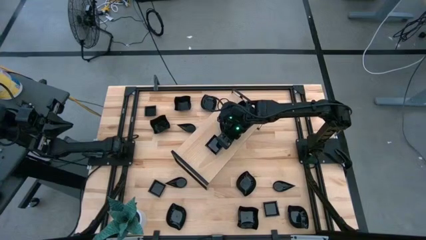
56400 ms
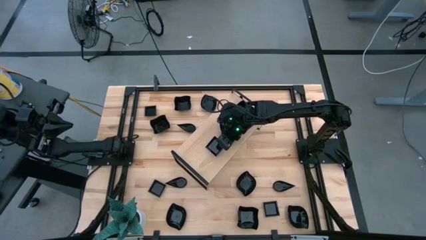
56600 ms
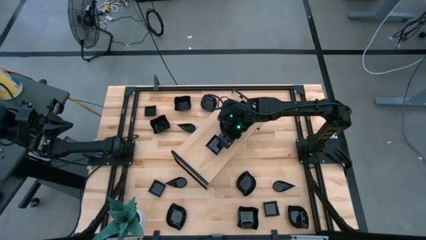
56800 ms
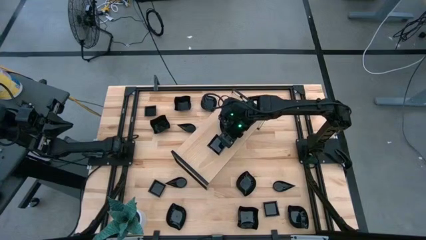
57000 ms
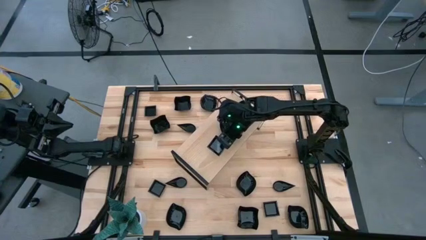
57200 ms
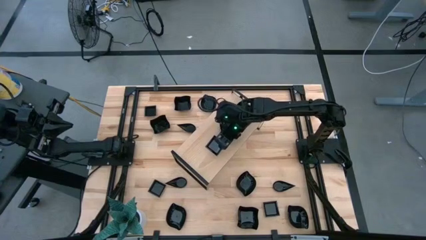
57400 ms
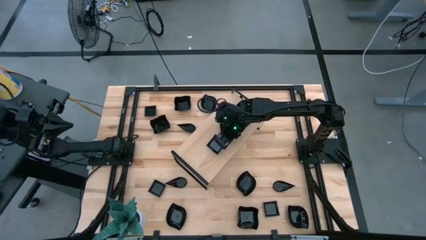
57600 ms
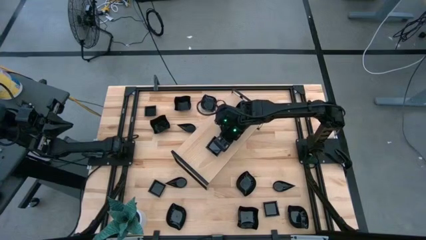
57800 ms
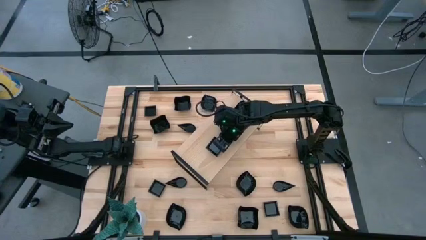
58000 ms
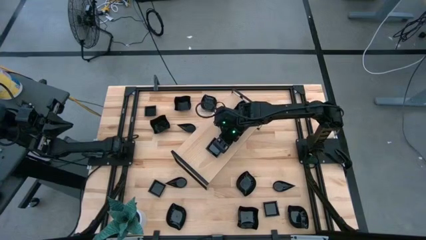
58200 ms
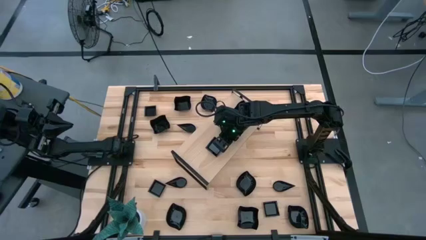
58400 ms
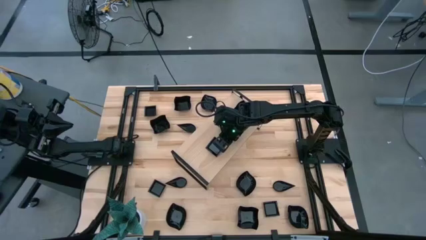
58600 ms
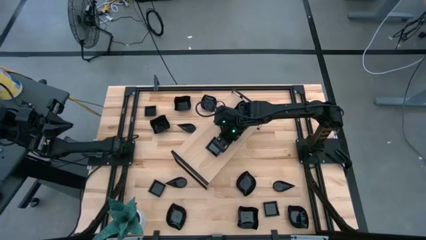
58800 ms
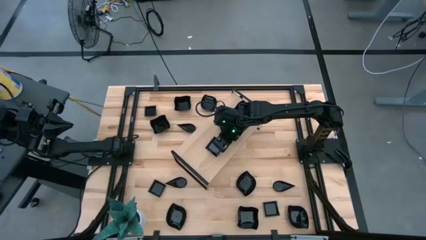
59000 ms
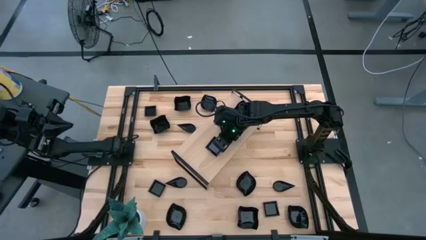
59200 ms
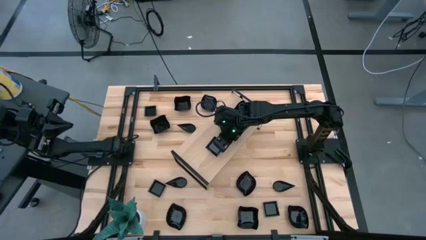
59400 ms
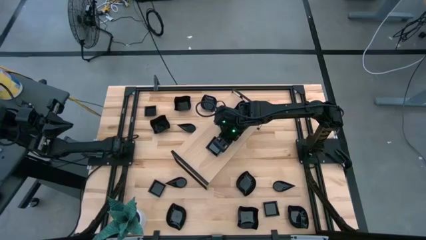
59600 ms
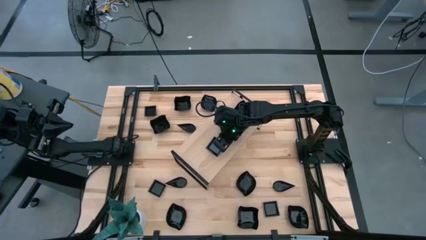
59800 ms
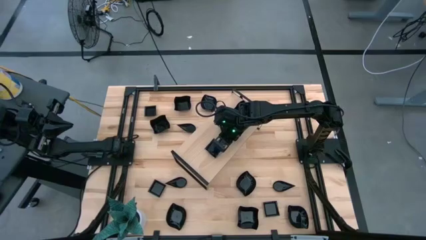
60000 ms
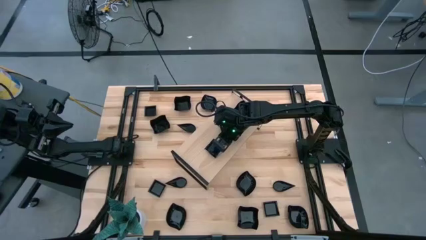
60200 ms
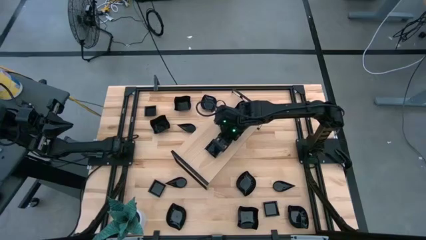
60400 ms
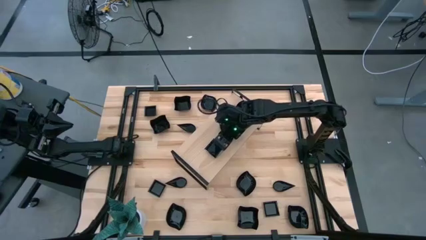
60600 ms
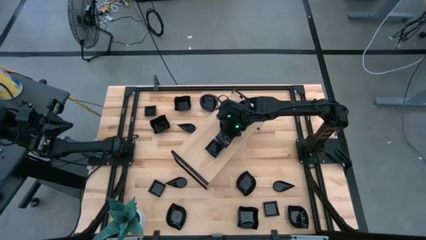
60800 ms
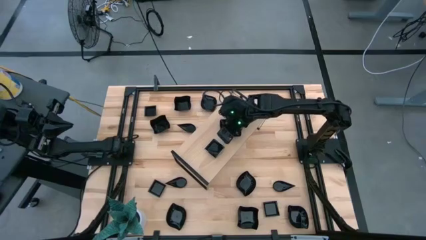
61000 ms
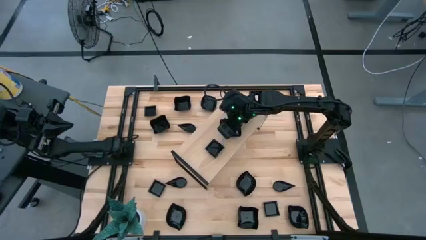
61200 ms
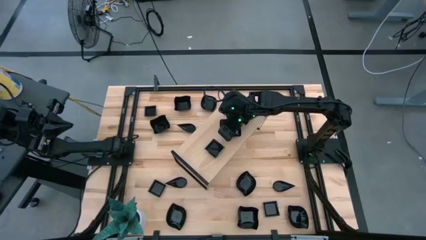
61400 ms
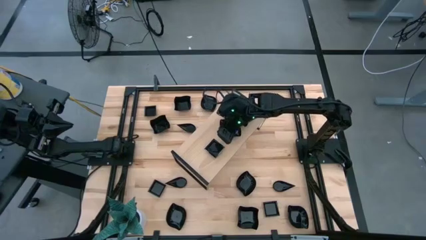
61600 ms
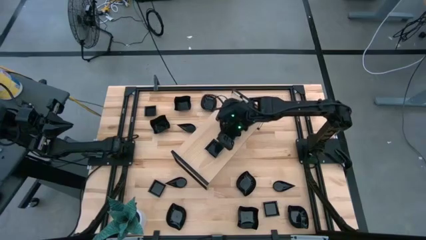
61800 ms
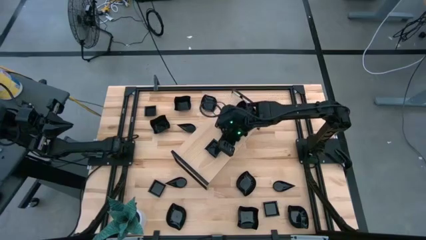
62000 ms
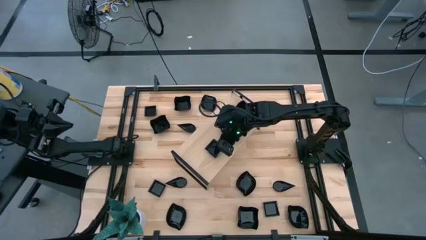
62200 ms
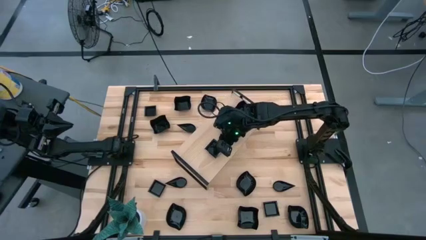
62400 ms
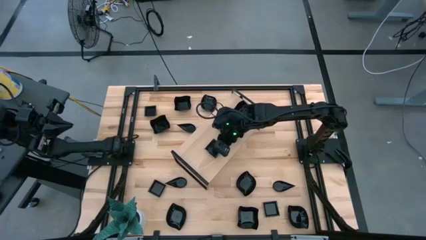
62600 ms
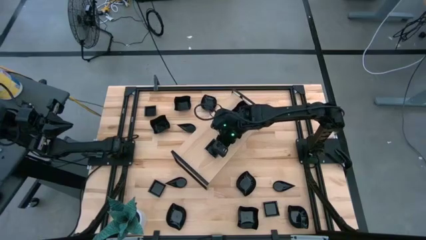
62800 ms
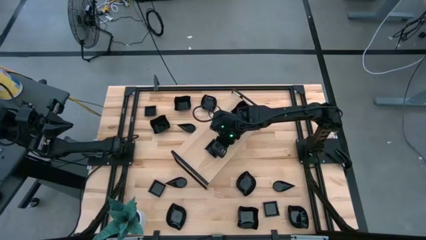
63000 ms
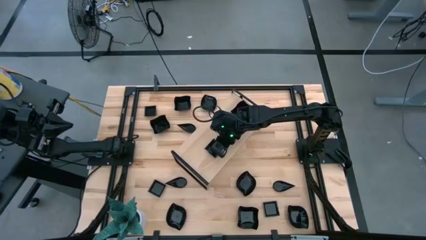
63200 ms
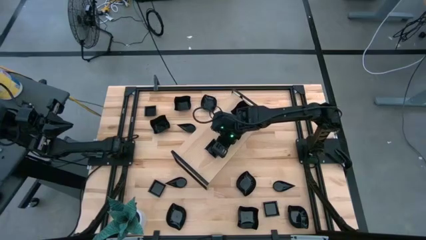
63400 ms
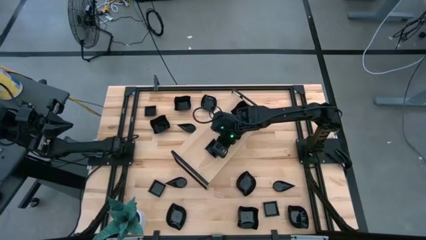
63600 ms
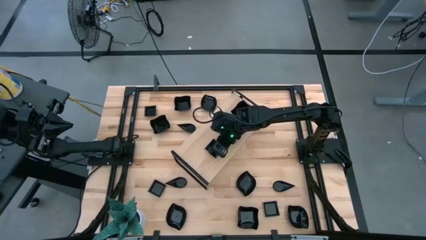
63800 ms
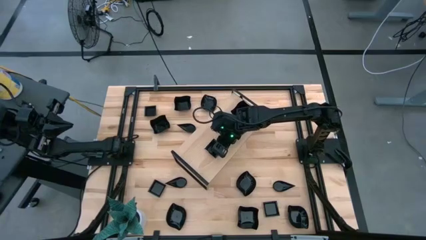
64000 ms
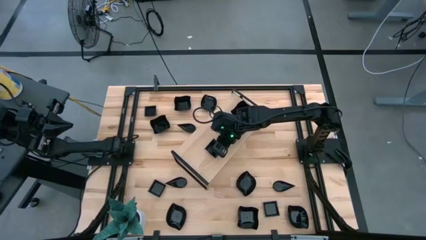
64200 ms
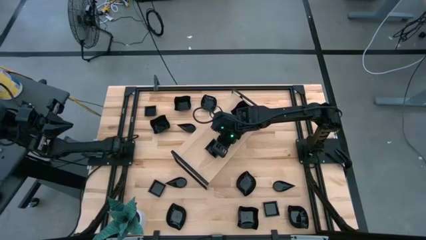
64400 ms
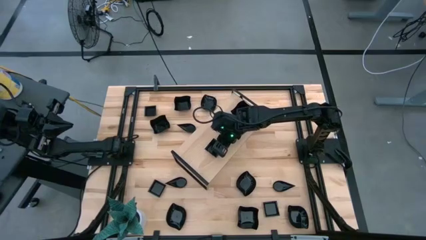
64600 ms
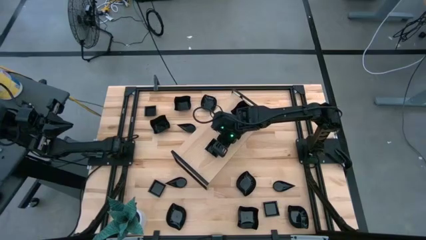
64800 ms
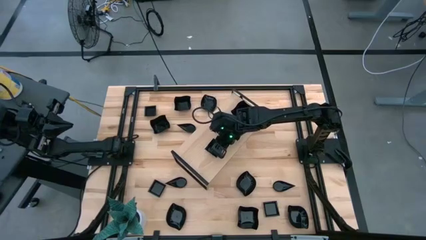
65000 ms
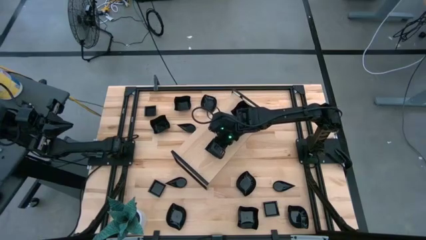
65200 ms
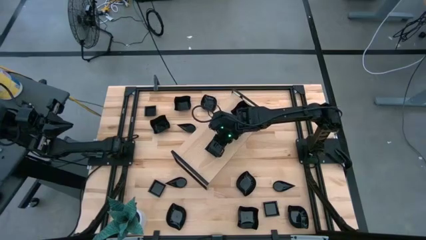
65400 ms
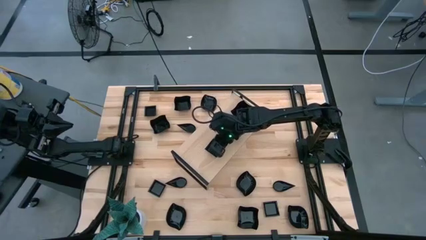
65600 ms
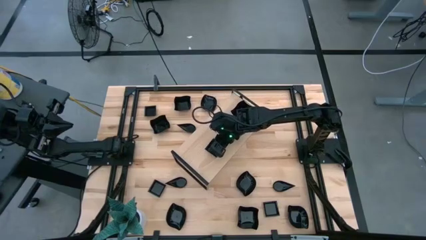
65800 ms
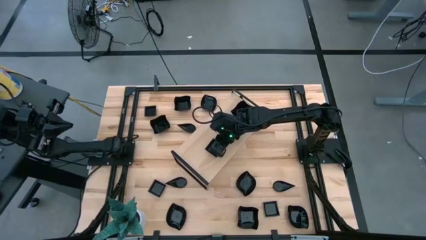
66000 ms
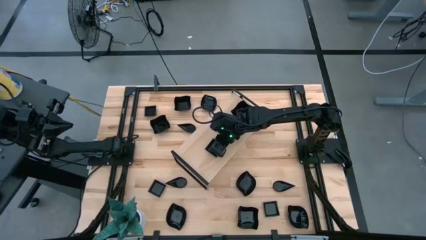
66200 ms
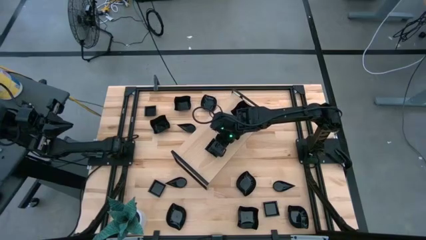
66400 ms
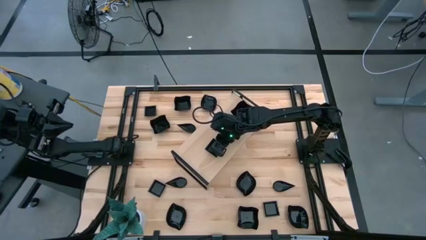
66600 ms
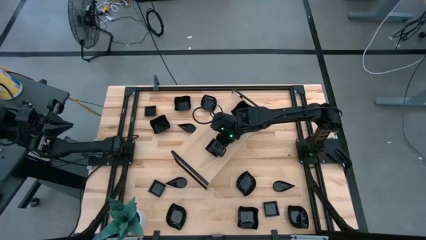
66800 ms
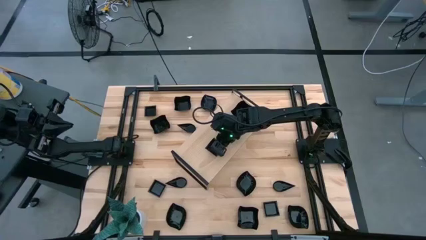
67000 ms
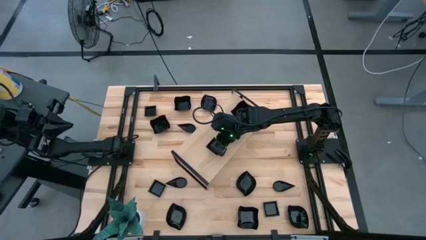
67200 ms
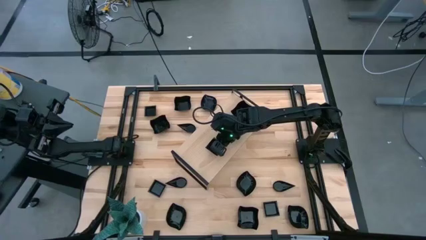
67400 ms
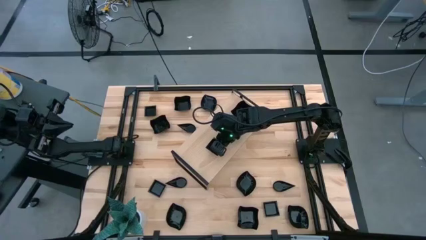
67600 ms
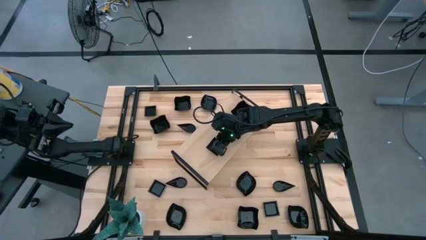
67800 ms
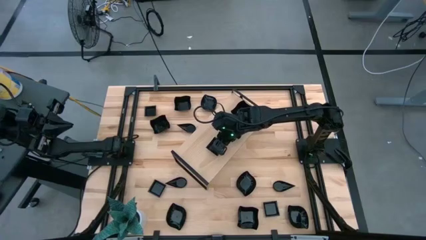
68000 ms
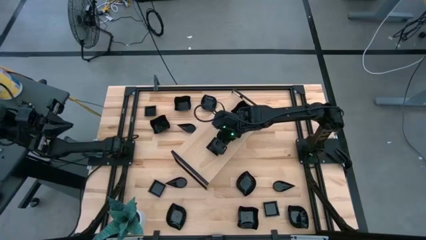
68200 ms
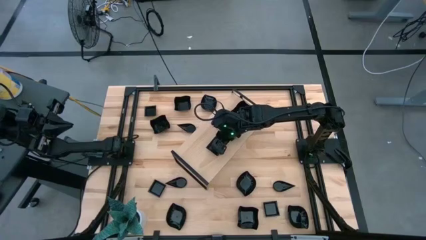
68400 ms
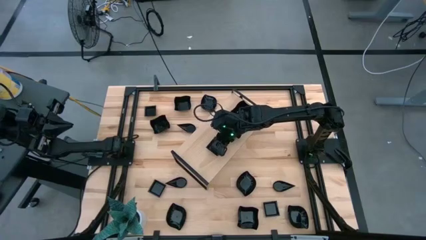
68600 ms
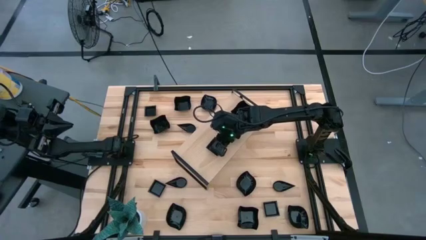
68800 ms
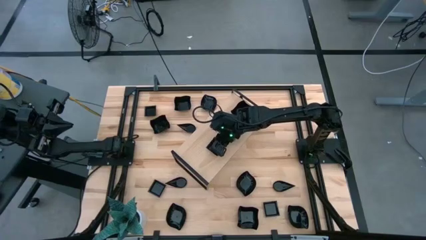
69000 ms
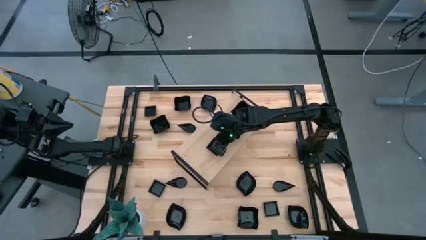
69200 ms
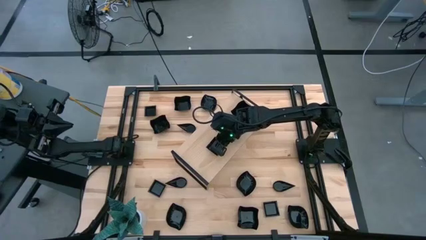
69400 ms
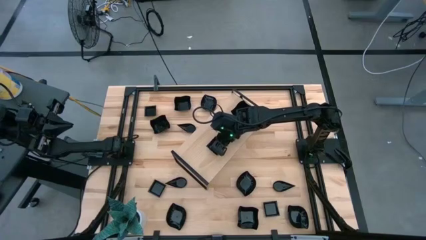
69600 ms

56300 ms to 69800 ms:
Task: Pick & Place Mini shaped plates
Put the black square shaped plate on the shelf
